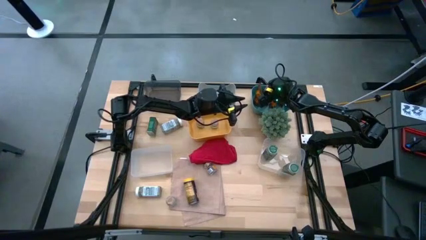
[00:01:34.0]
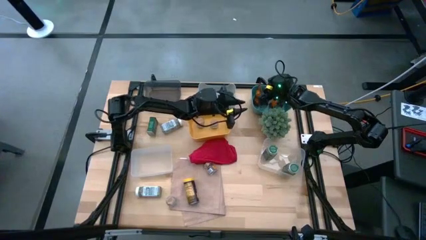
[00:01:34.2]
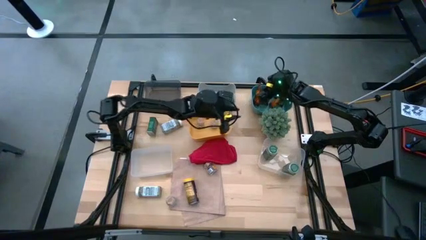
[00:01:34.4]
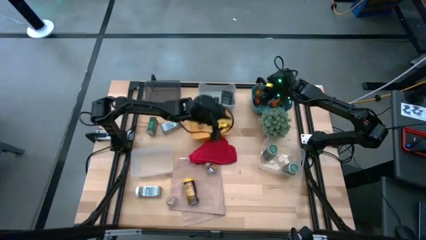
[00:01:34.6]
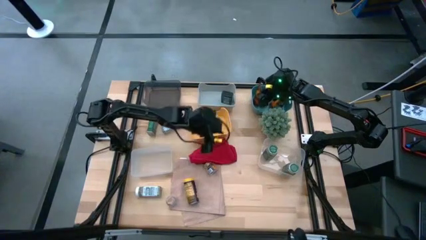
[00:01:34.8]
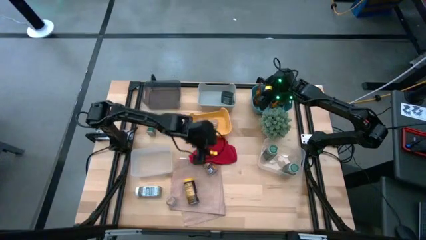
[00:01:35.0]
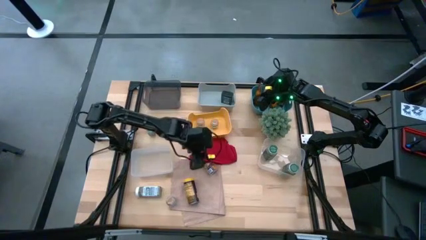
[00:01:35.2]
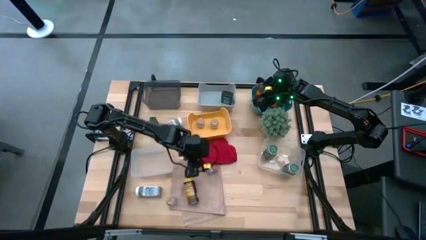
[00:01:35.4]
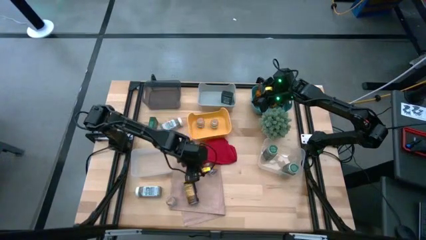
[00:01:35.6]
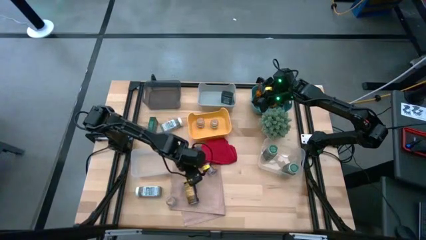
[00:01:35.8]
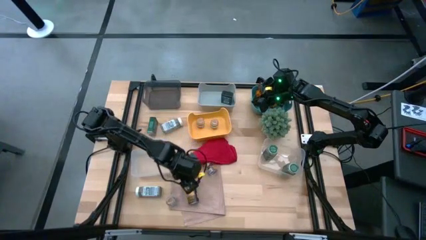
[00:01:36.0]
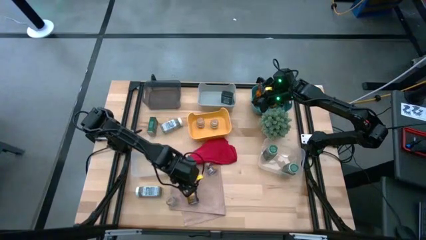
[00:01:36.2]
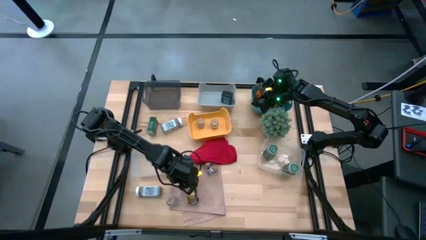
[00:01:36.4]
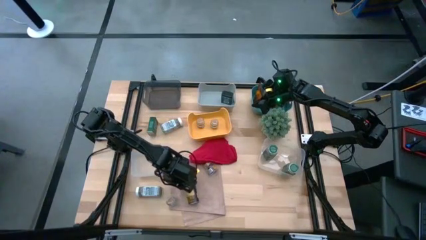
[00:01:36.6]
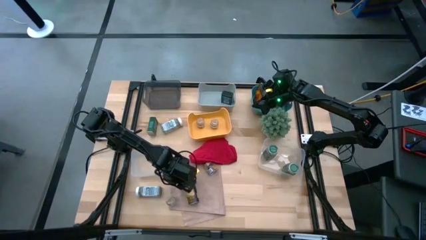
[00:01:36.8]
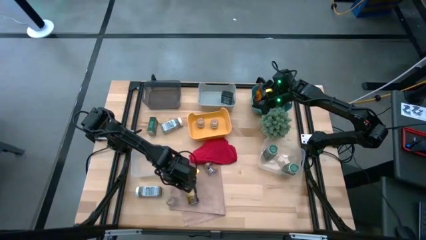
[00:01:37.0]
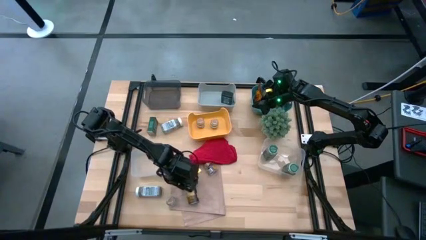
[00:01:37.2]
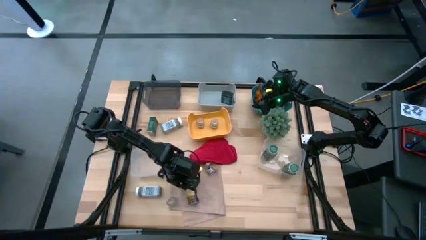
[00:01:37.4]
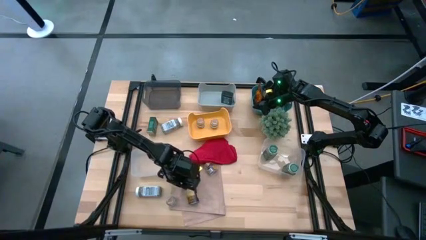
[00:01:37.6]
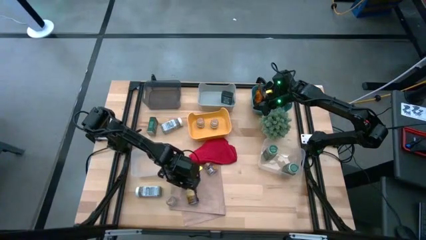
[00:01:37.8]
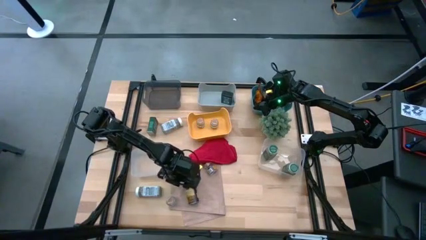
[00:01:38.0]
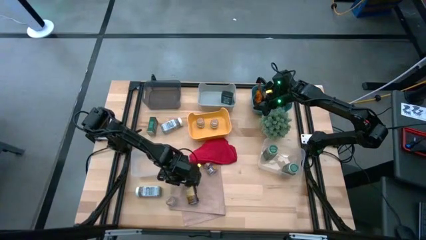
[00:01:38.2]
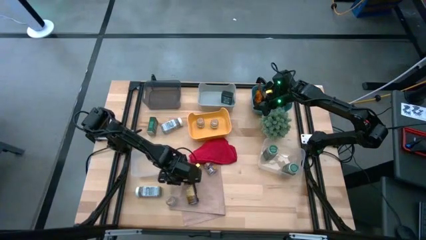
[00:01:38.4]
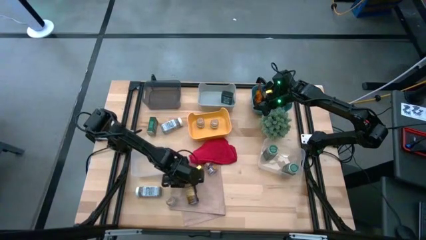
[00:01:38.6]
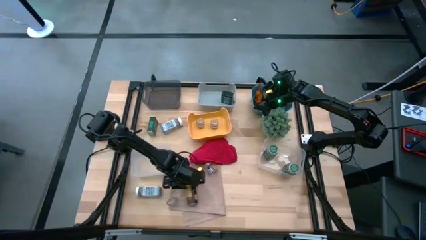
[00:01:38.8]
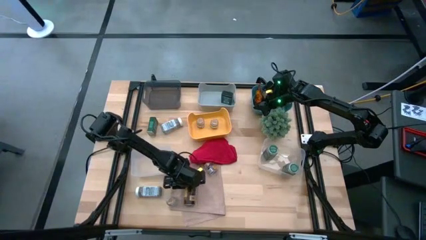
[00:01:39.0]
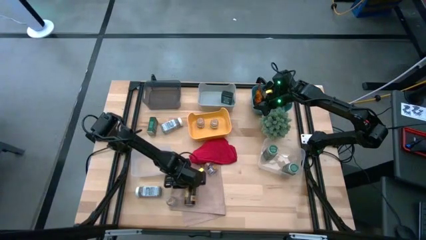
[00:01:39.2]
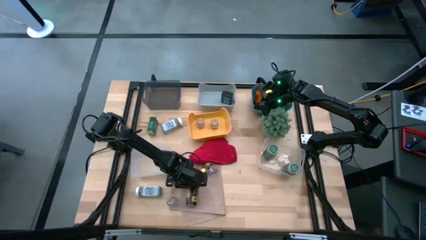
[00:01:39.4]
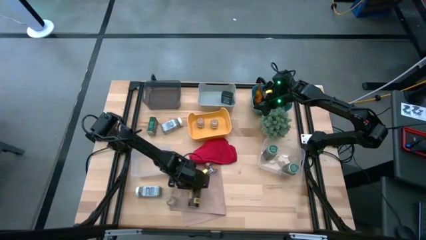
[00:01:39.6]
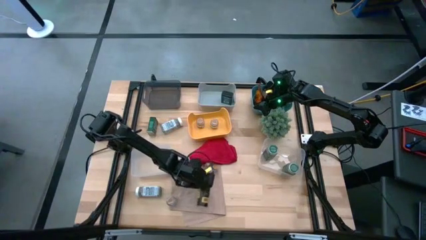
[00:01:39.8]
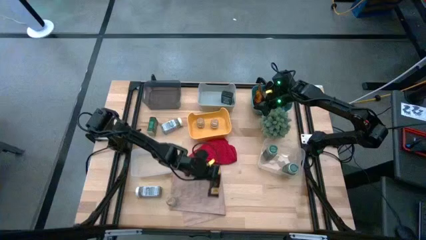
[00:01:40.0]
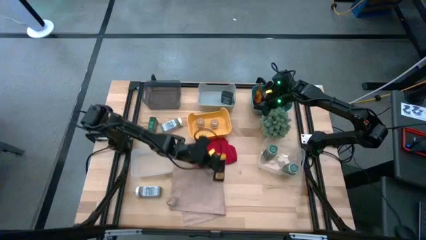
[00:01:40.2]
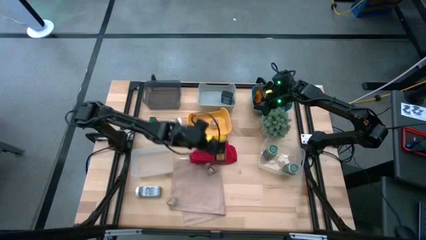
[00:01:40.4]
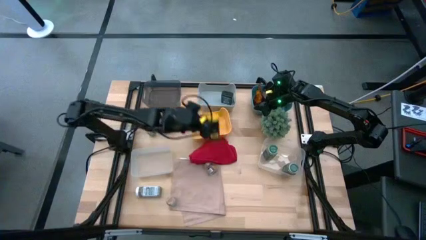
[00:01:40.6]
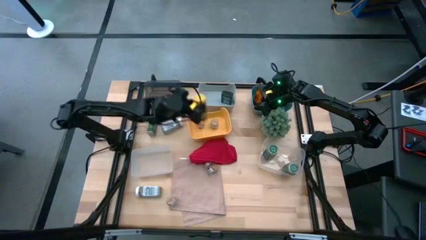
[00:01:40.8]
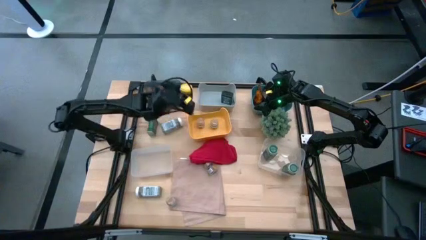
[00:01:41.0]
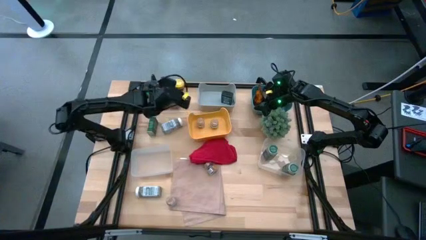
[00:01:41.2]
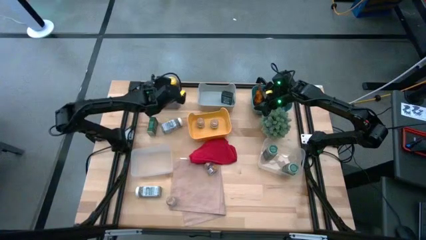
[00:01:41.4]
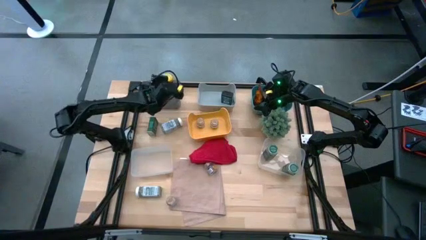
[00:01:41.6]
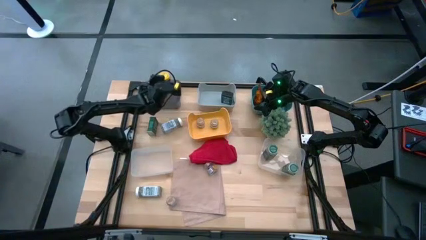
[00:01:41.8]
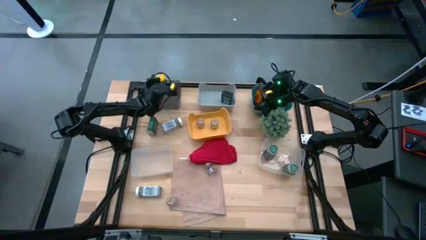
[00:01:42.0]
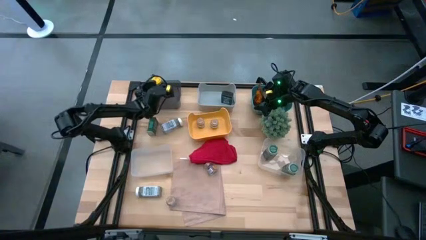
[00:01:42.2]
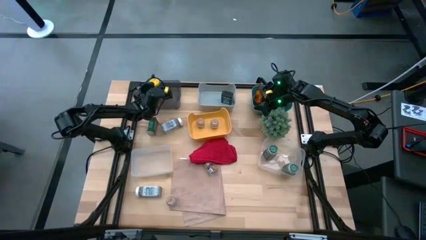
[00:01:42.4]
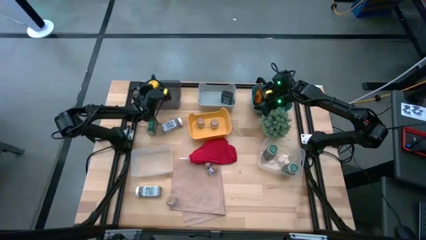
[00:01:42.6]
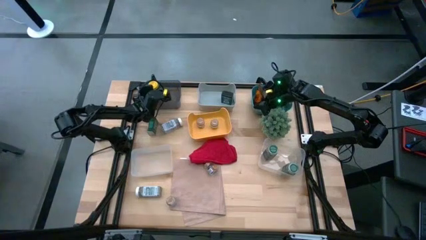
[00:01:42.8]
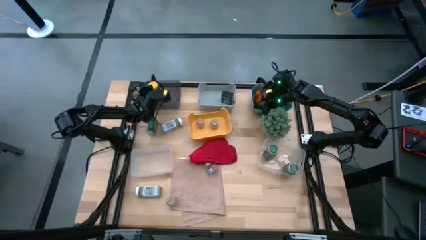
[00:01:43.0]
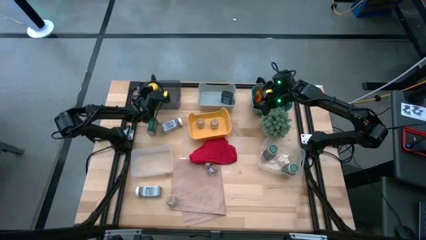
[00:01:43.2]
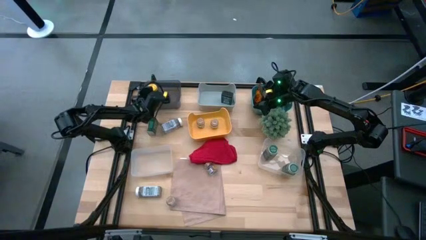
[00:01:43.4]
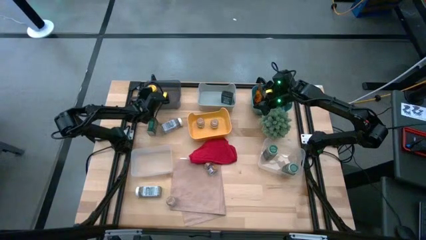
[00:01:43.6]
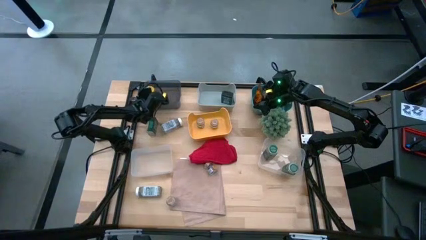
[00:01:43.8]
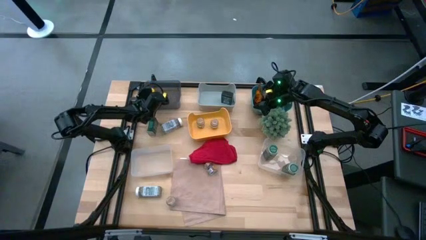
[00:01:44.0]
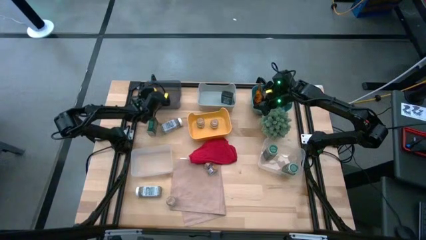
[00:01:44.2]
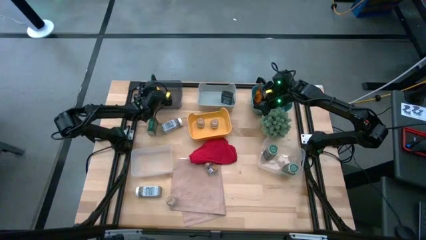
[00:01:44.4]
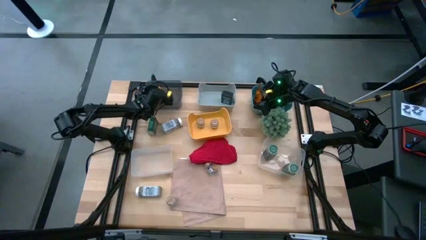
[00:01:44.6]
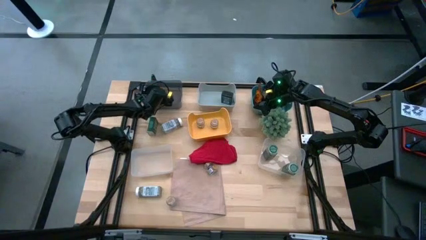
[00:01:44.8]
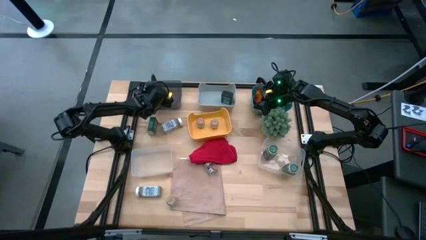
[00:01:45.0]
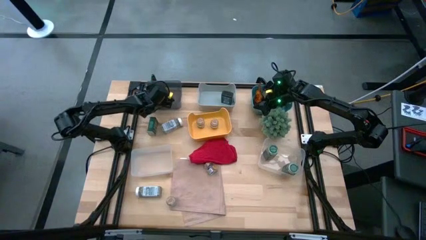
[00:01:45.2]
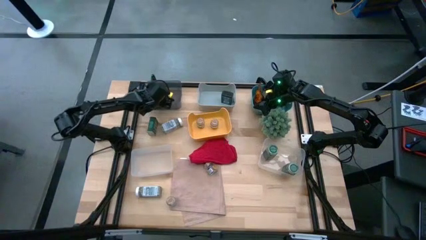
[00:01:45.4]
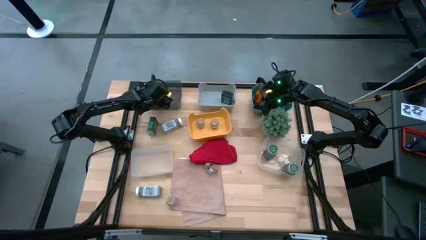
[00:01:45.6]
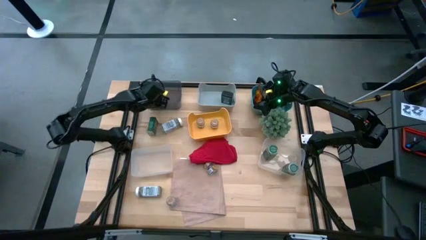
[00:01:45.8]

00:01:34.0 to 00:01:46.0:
Task: Sort spices by type
Put the yellow seasoning bottle into the black bin
